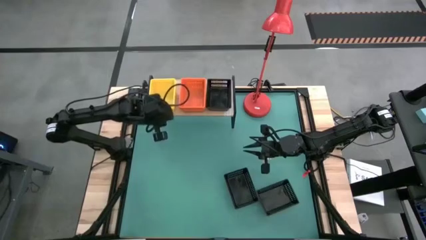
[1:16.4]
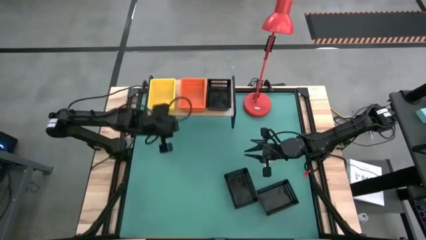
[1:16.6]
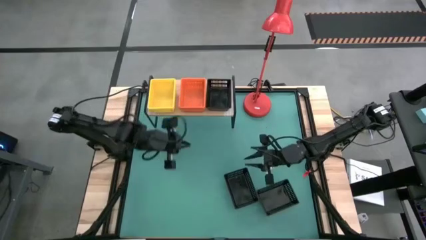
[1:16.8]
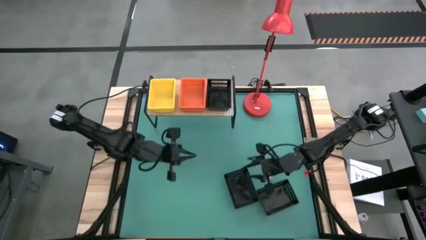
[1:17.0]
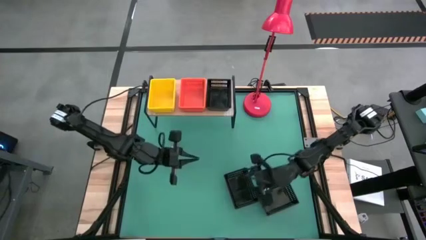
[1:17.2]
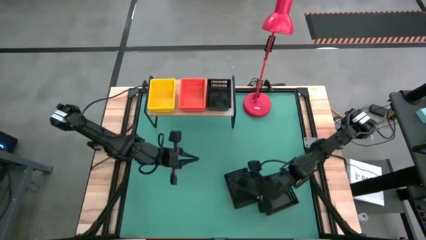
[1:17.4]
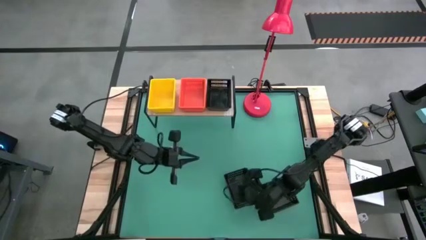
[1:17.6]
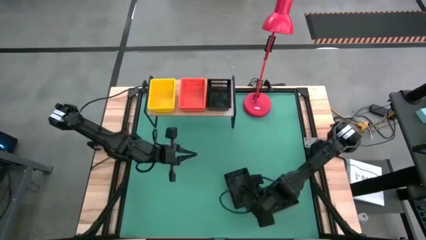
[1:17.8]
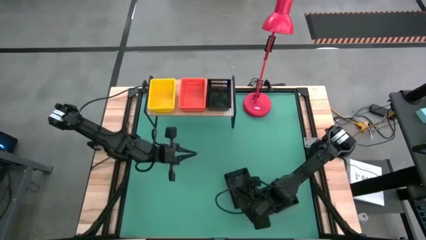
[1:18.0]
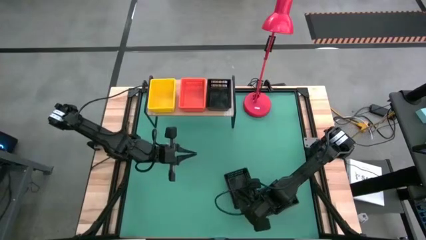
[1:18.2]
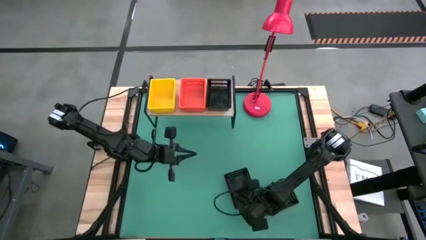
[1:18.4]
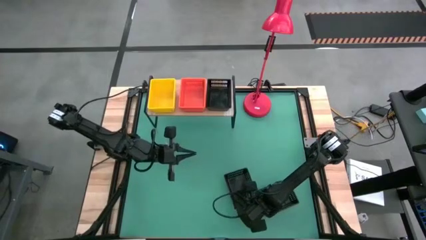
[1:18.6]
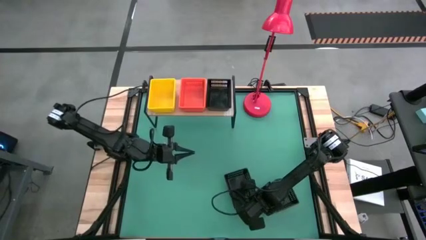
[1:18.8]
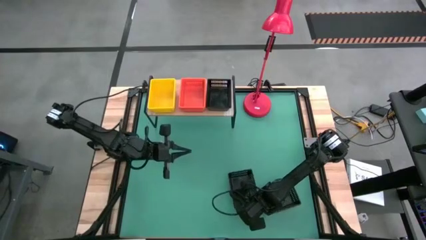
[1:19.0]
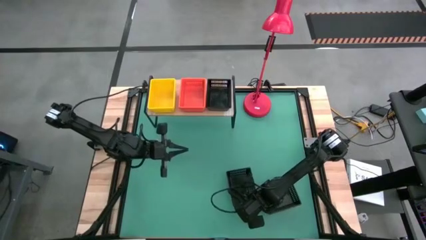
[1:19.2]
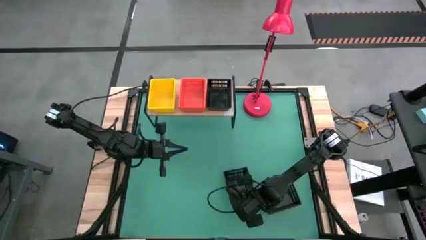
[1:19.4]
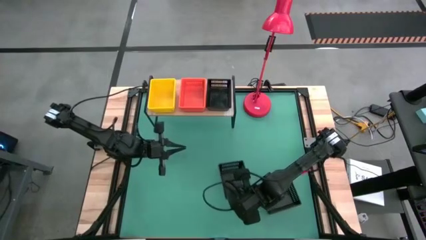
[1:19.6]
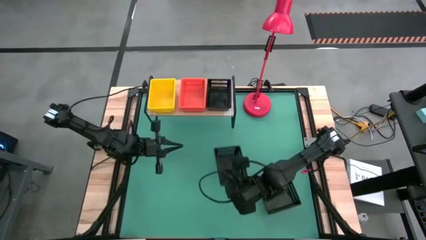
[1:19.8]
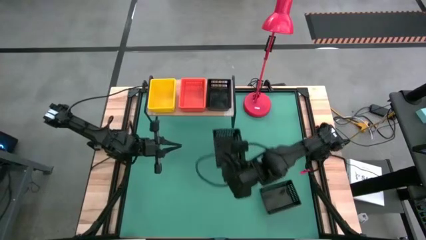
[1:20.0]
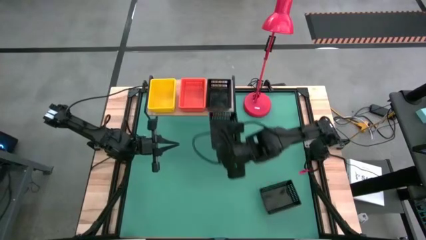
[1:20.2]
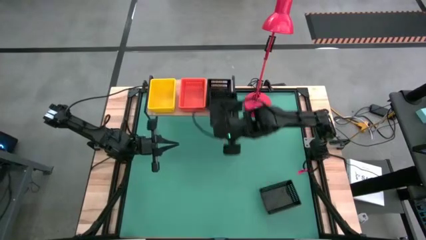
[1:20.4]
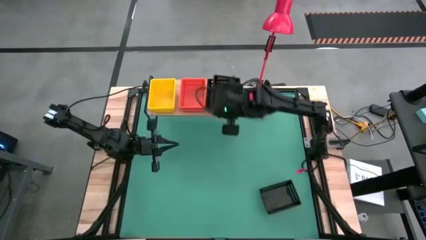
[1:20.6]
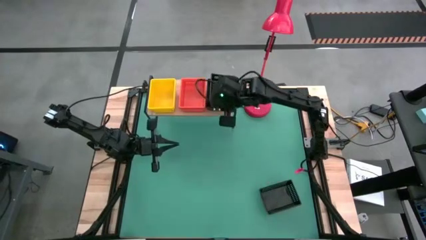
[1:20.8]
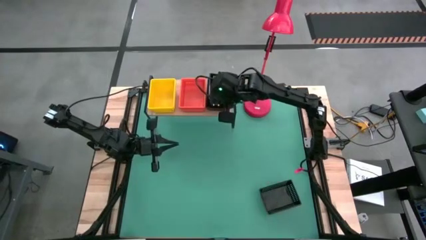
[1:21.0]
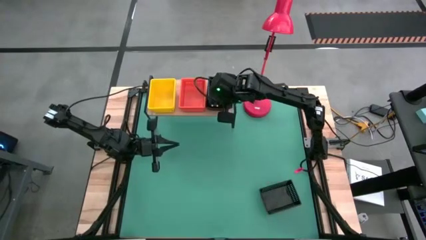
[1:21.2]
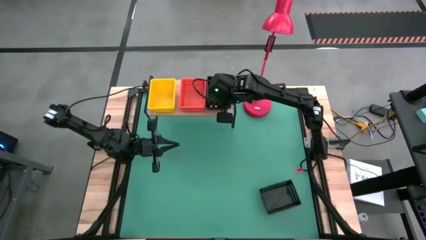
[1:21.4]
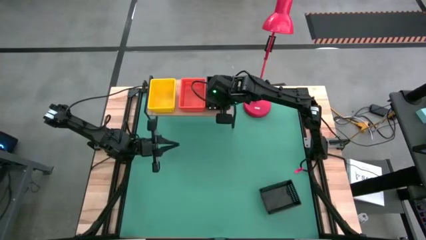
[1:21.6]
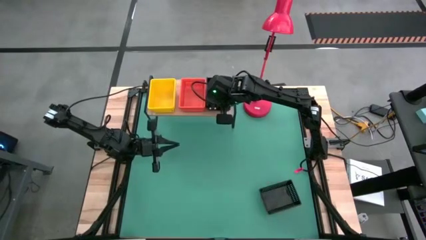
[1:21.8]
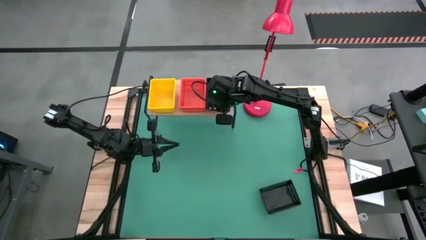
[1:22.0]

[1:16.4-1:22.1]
Task: Stack baskets on shelf by color
Stack the left black bin on top of the black bin on the shelf

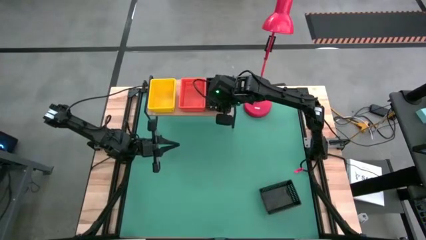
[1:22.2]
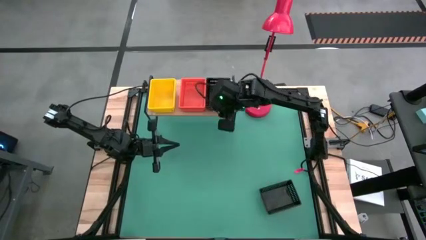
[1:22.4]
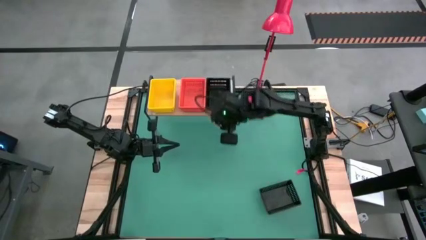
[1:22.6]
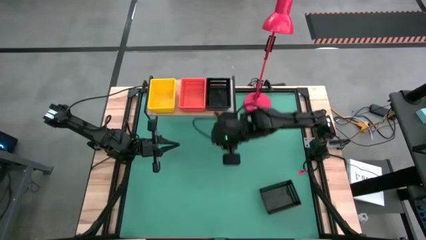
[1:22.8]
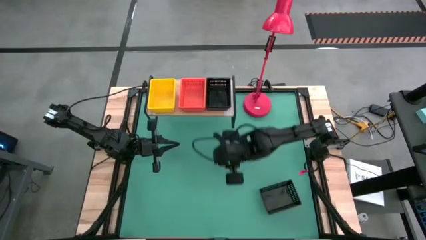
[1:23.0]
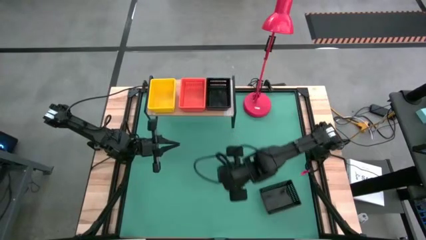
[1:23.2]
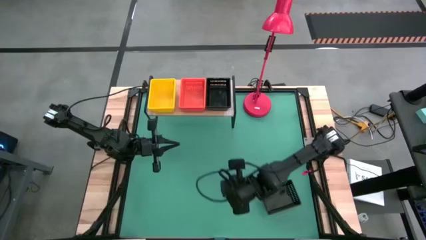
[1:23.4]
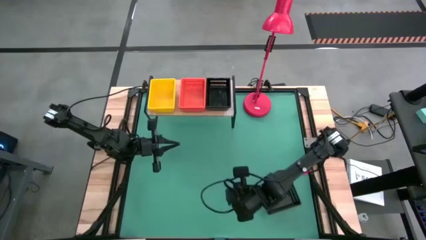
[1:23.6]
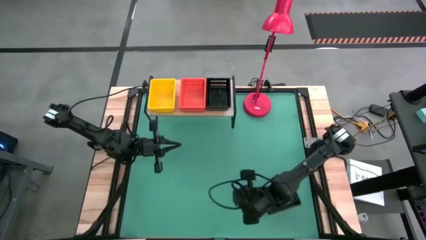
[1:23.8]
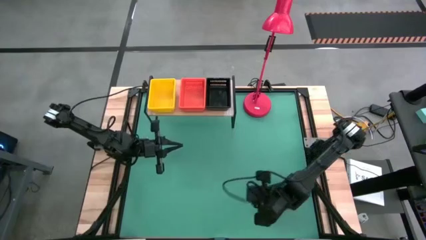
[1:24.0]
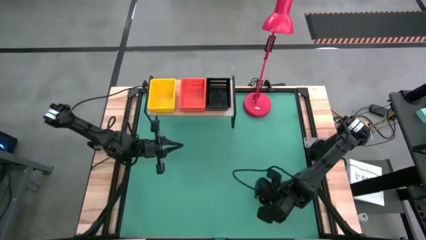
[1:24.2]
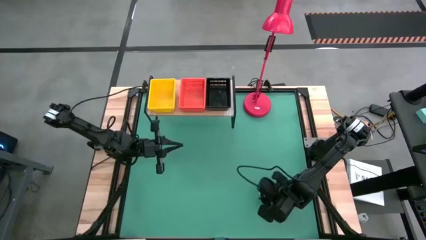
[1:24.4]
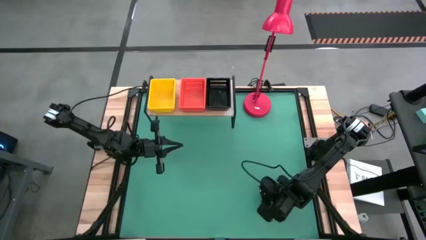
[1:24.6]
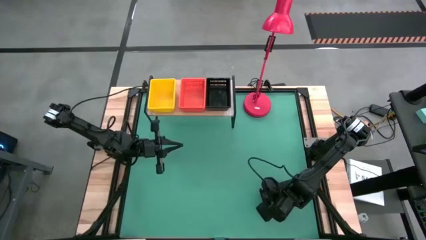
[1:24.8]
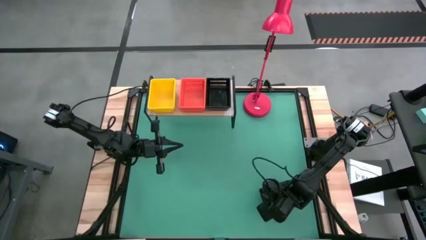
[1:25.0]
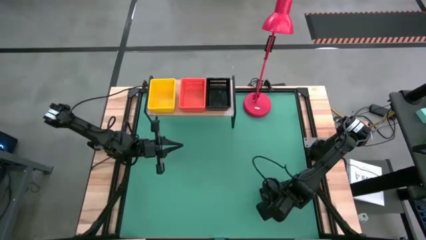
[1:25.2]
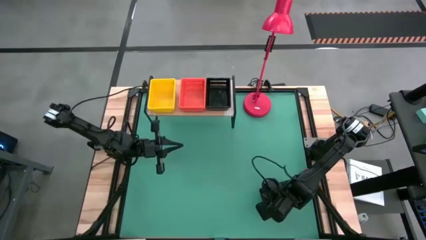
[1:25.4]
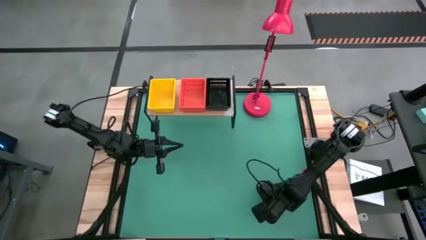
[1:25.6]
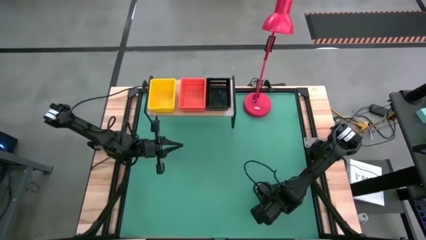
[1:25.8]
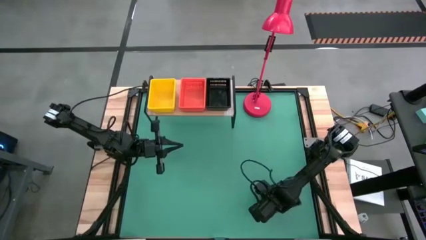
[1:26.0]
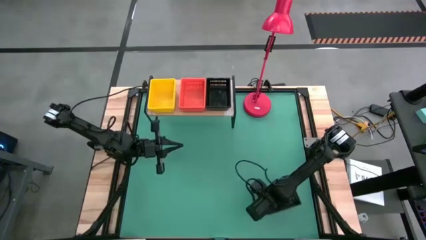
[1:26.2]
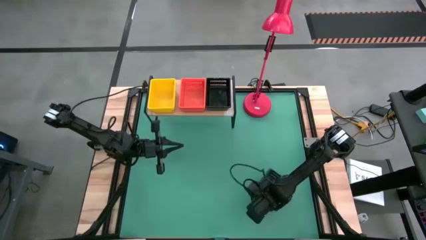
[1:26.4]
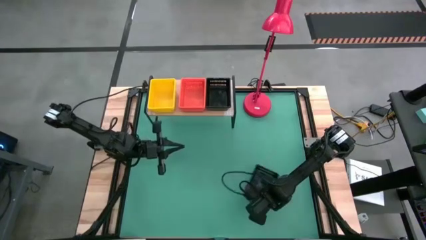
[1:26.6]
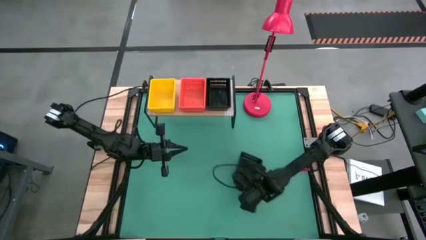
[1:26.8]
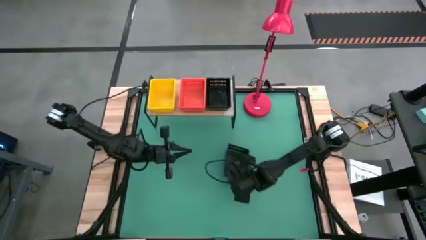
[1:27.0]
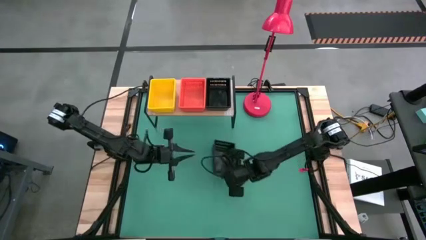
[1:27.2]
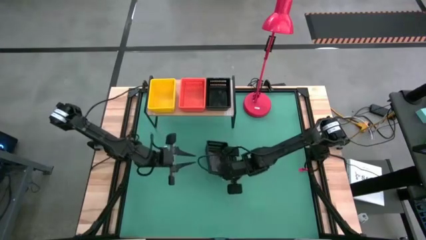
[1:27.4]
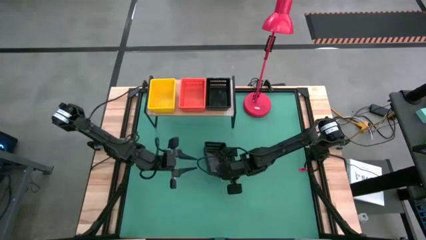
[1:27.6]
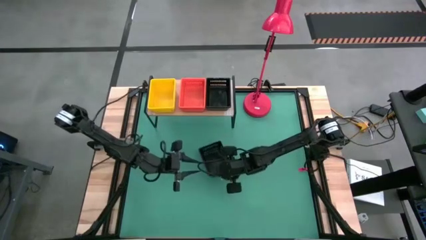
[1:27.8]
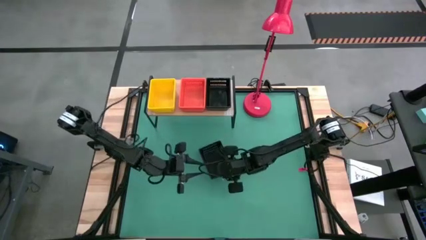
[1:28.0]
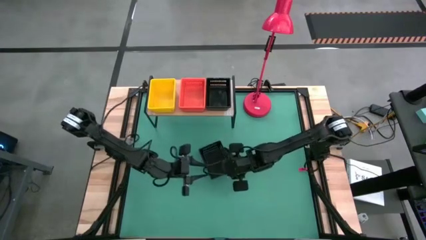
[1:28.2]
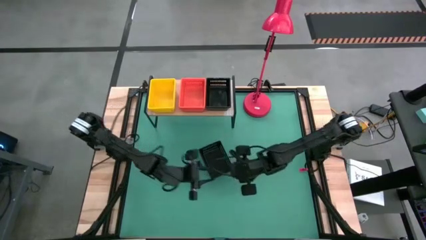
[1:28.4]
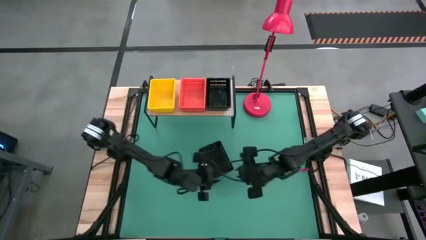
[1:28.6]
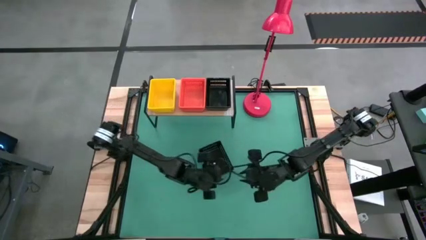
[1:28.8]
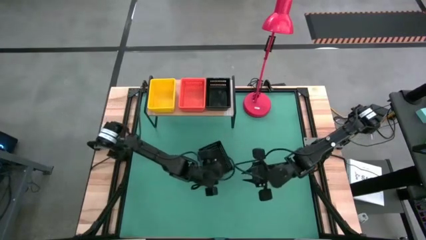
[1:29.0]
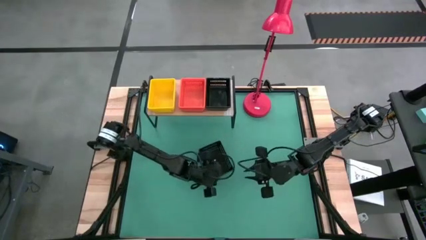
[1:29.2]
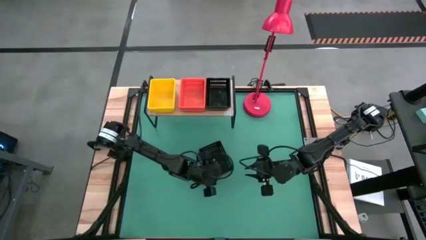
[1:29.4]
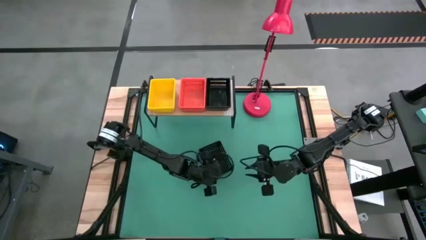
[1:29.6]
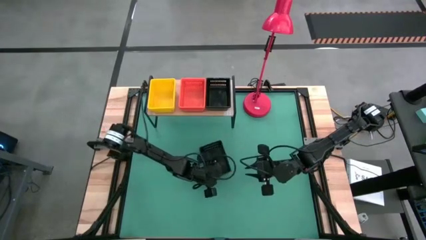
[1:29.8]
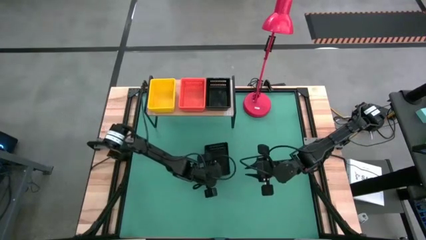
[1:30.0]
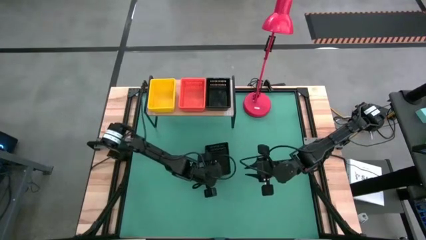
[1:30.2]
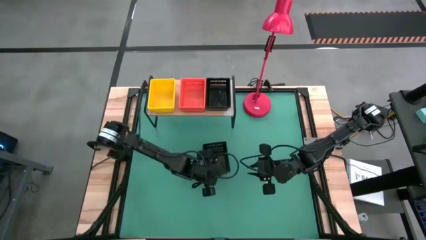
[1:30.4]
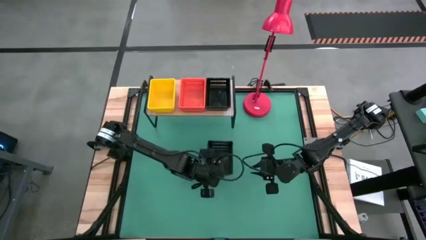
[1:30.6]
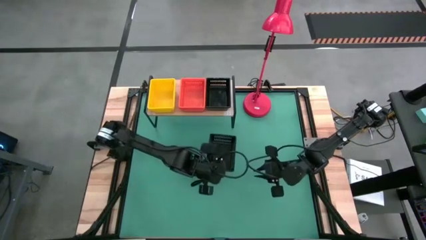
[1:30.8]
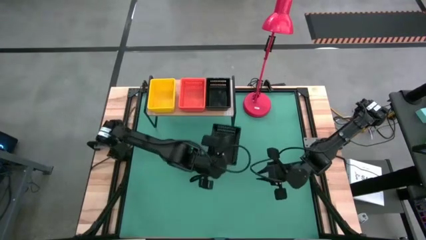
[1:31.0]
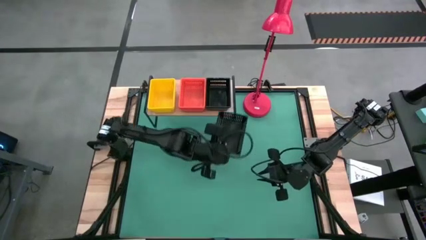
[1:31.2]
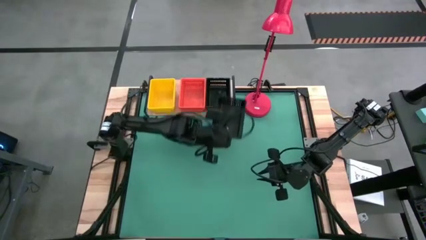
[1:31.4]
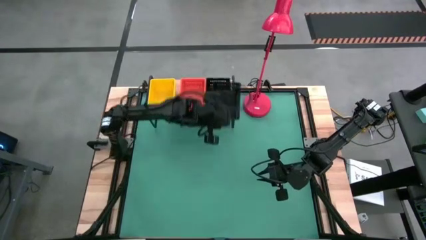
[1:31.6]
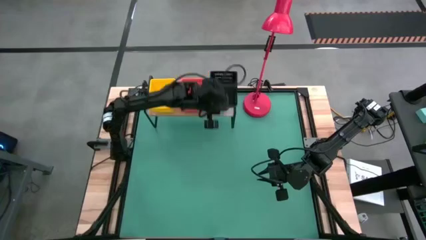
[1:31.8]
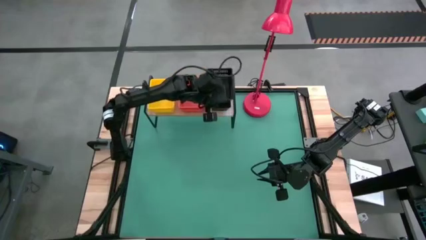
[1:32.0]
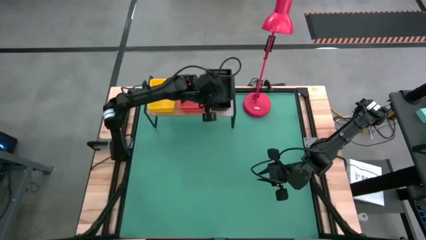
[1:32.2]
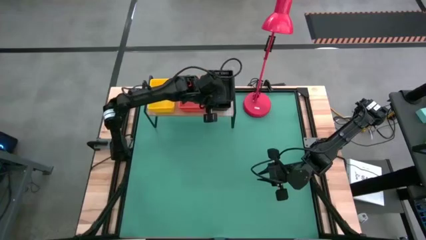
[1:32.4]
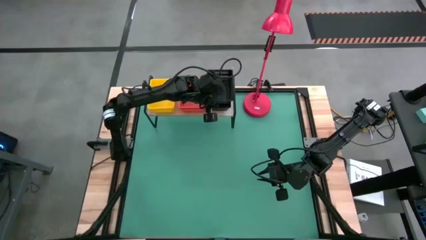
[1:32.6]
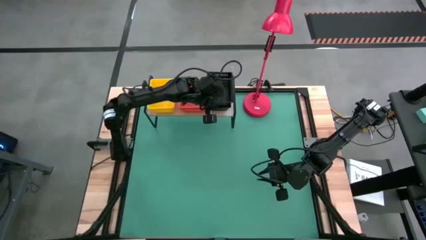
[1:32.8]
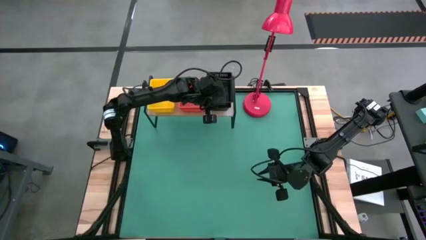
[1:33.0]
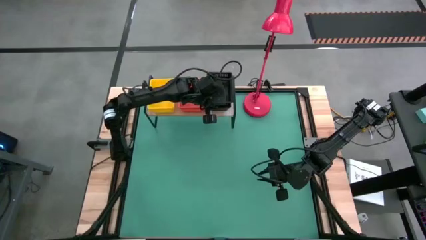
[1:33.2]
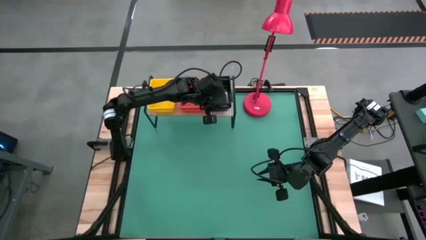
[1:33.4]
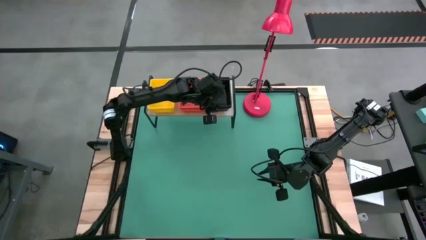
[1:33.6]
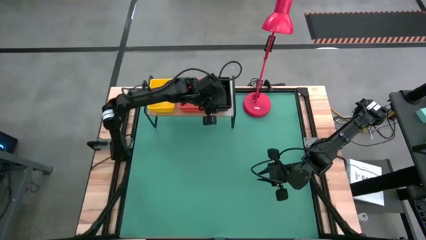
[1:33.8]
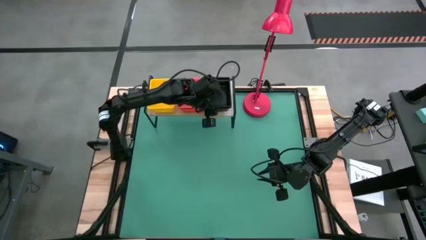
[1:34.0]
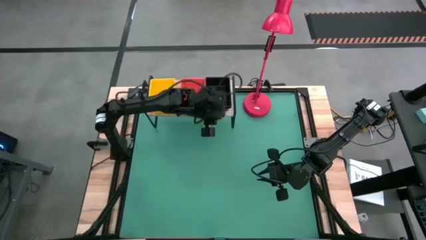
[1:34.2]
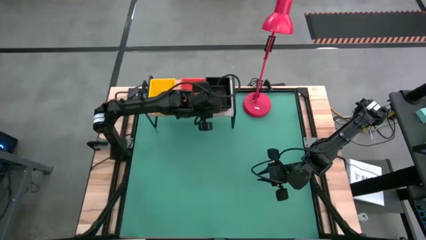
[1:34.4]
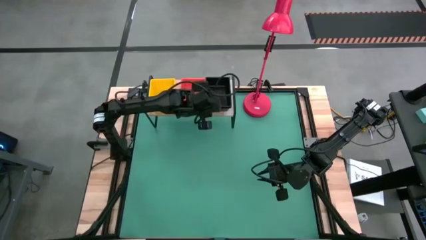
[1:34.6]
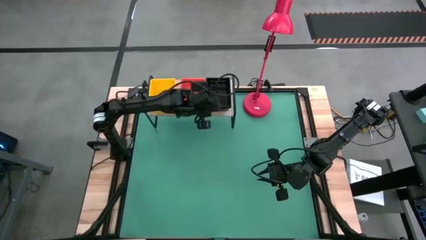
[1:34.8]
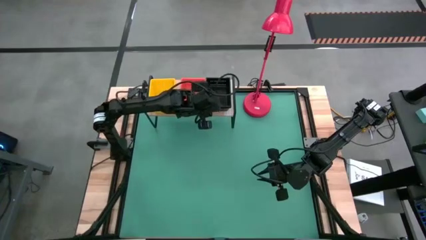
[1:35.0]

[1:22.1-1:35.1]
Stack the black bin on top of the stacked black bins on the shelf
